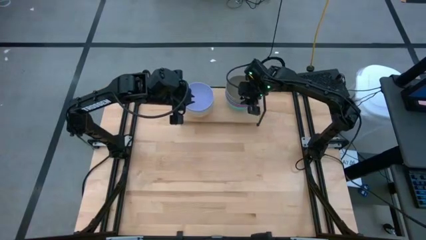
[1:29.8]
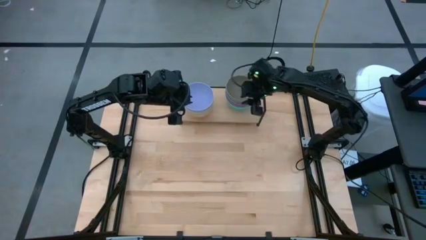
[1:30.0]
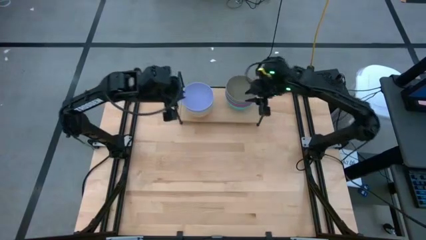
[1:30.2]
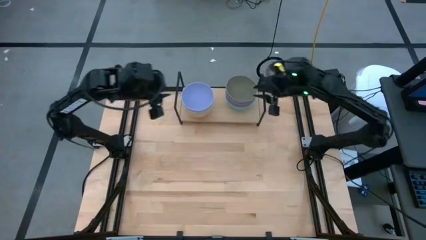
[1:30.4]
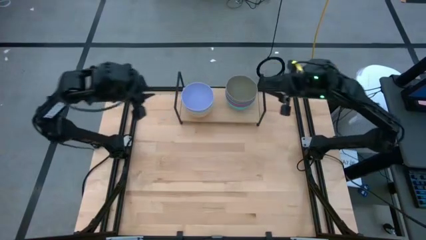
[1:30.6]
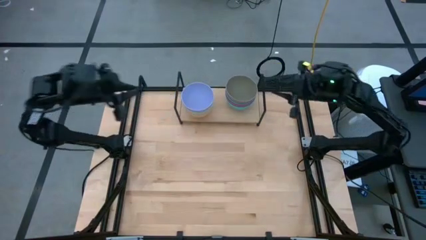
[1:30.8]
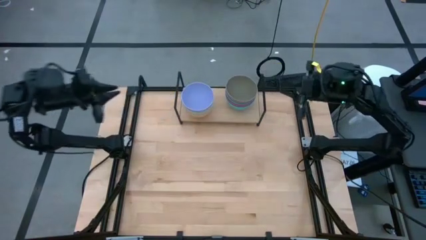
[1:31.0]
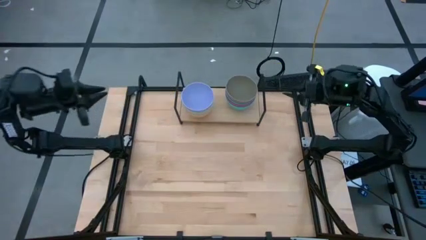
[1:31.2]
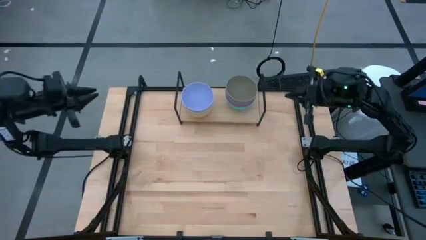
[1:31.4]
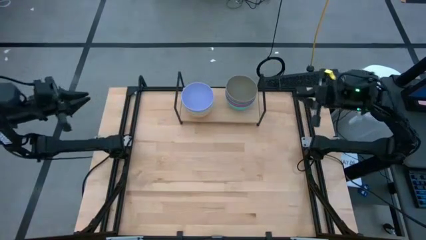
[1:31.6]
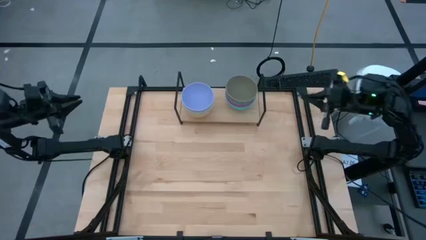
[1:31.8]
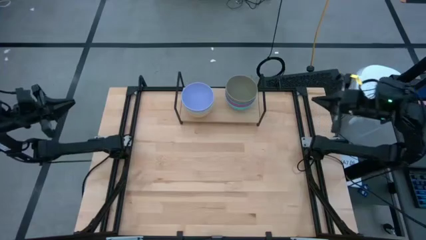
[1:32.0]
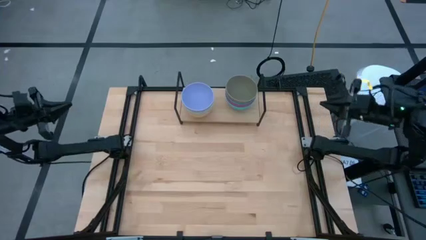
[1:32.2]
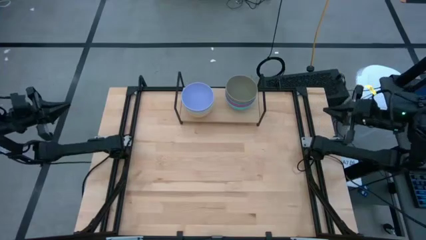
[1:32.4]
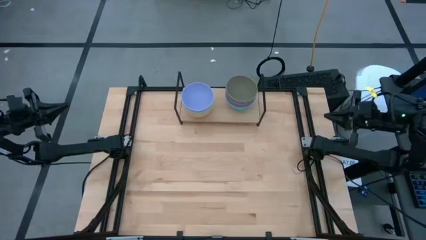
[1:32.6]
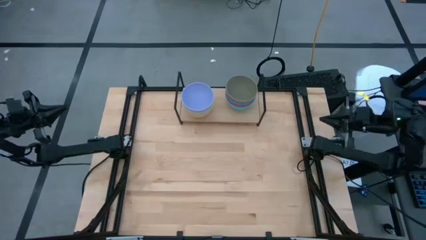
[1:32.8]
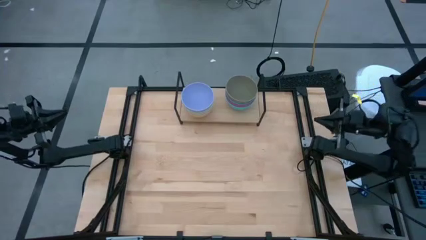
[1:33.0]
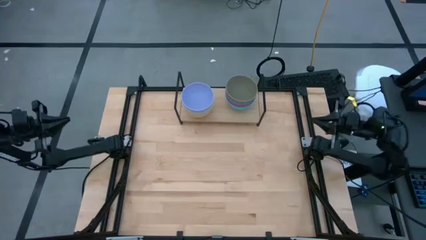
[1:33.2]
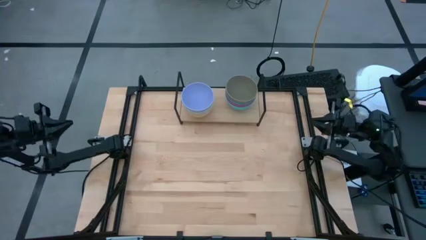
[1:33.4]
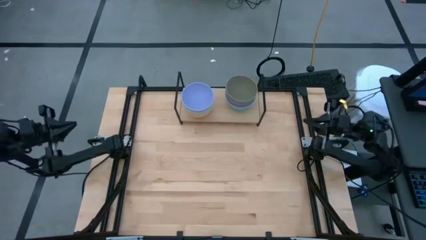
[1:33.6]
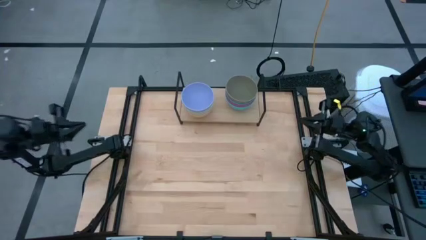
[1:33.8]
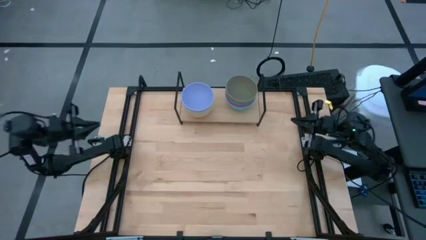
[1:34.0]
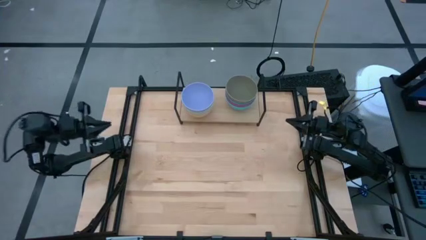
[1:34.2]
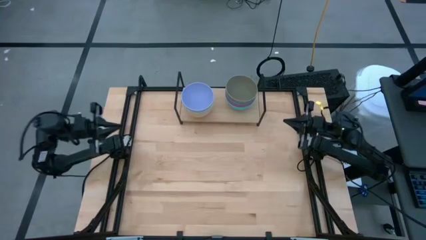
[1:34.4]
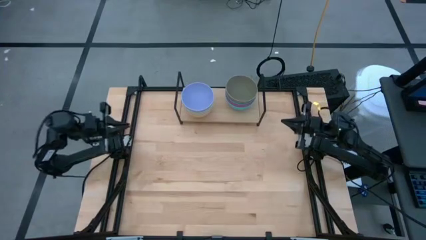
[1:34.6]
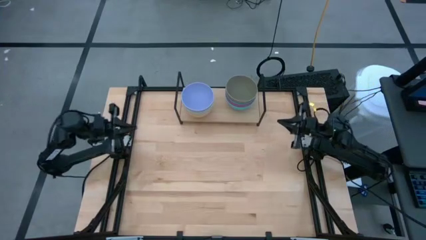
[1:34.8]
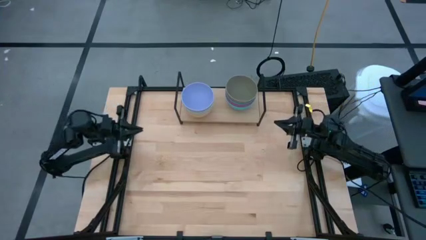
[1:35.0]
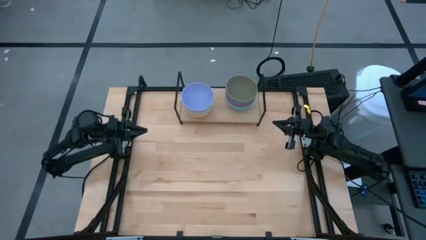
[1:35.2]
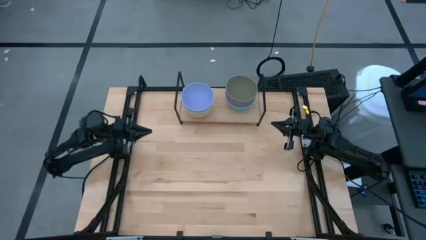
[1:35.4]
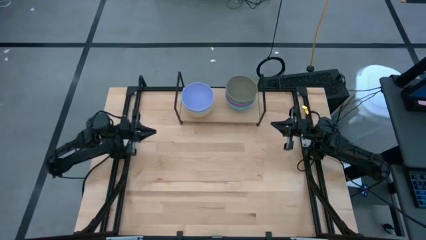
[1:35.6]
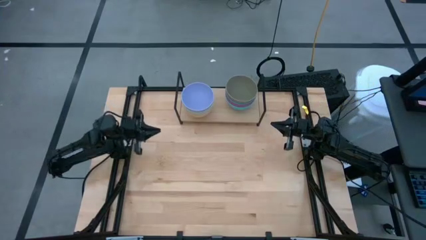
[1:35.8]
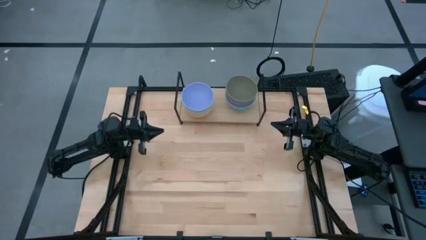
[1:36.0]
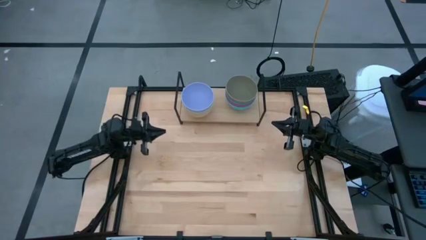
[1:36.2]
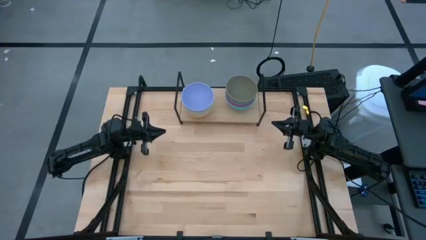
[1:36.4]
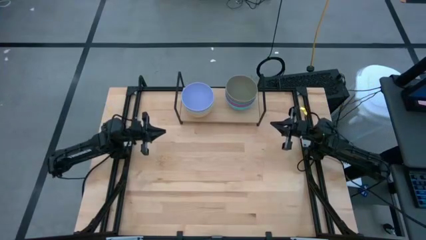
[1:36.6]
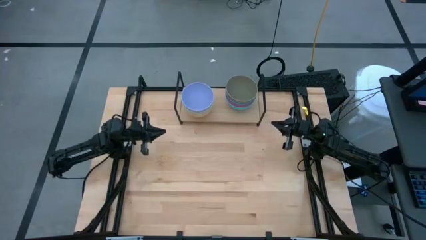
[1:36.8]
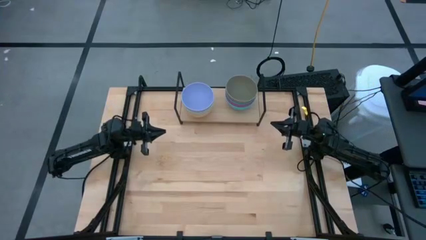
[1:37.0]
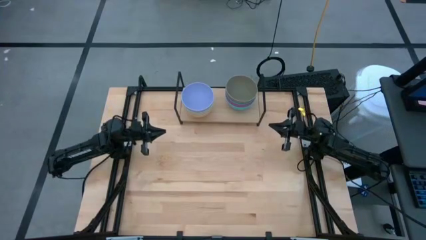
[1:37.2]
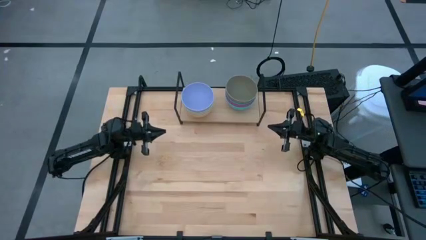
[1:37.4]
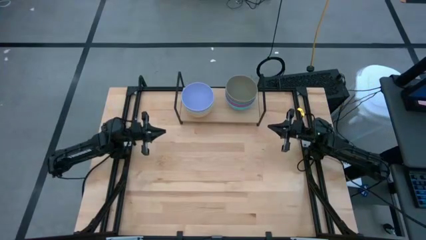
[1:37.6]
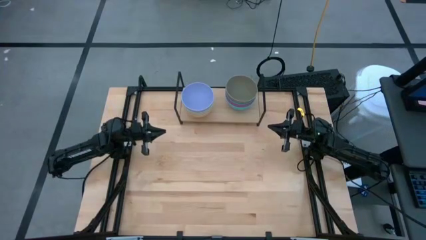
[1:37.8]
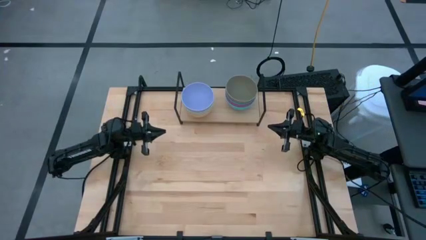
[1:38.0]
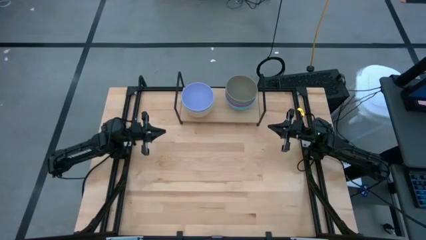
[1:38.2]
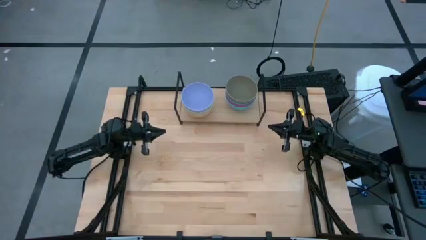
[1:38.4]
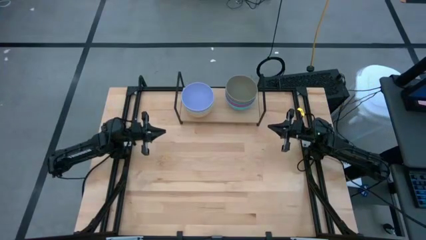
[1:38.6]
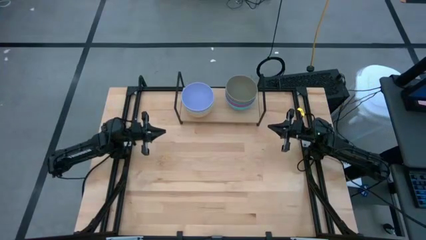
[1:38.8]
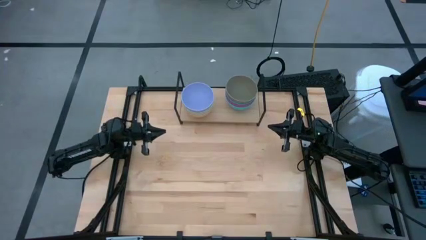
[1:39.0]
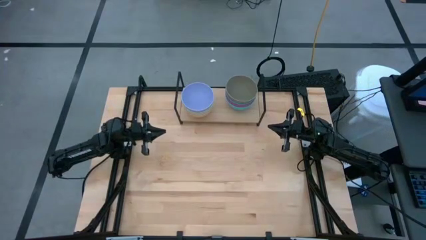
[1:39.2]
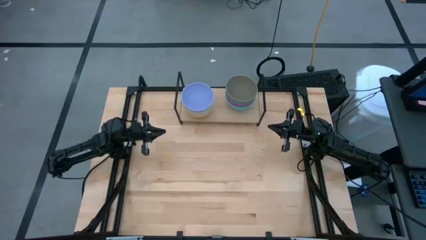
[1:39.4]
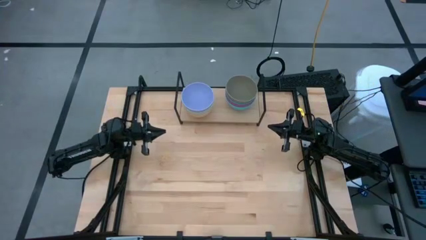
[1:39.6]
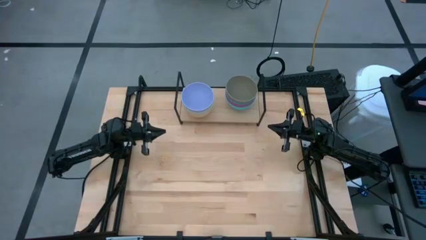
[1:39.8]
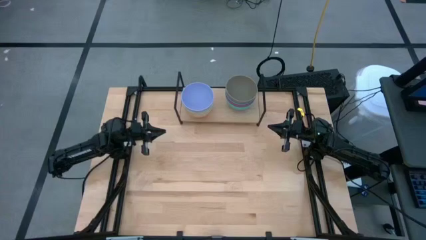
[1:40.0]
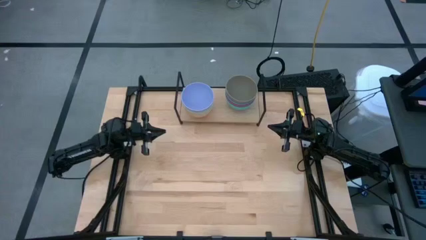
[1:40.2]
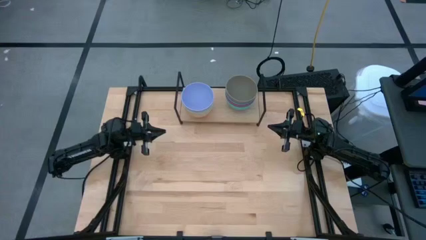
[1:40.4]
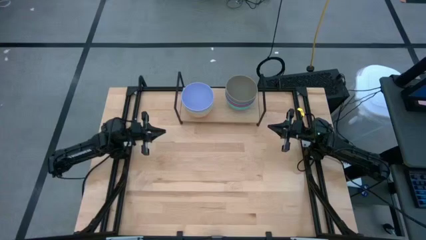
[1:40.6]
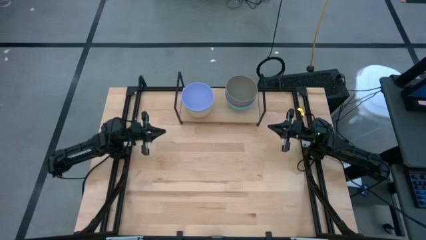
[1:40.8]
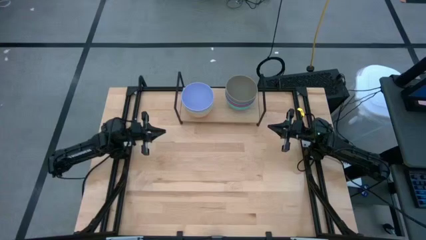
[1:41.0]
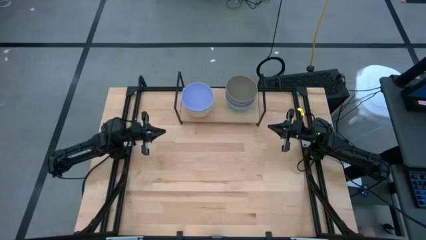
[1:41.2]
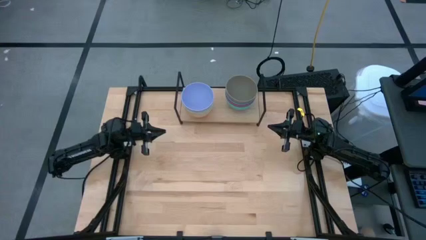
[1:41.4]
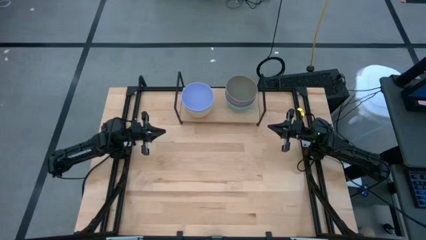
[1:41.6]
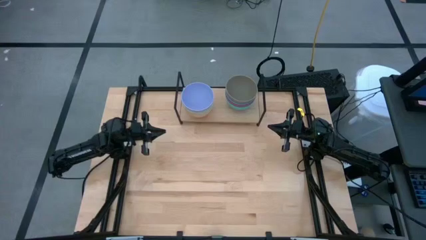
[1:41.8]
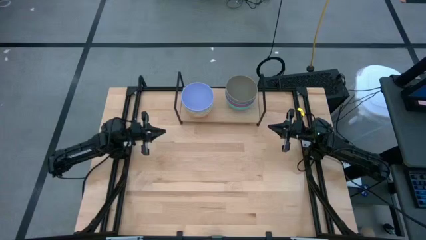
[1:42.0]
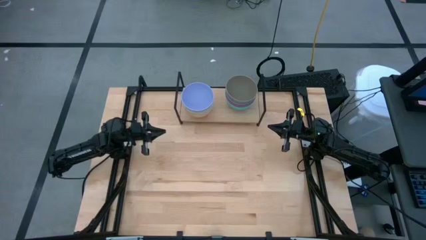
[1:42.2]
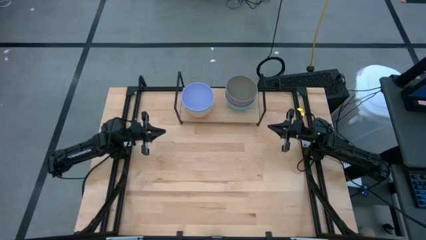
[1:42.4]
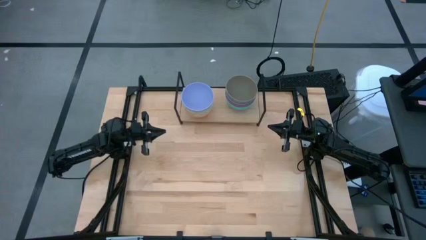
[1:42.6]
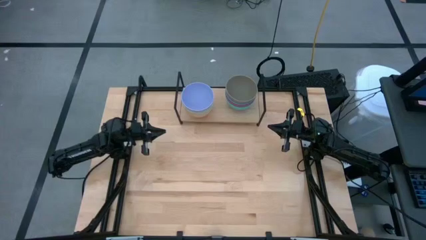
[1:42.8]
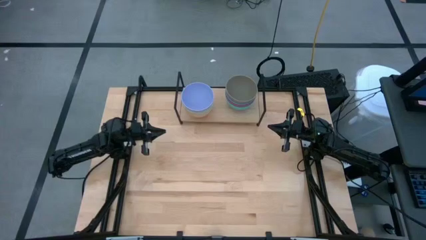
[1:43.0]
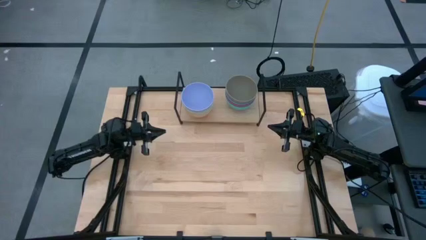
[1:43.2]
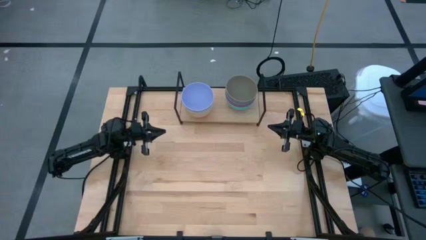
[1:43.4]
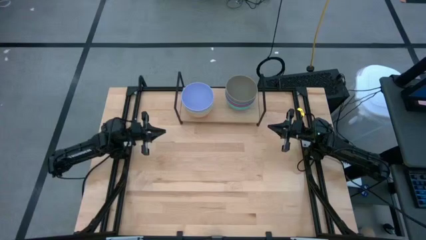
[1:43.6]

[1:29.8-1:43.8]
Task: Place and stack bowls onto a shelf
Return to Home Position
